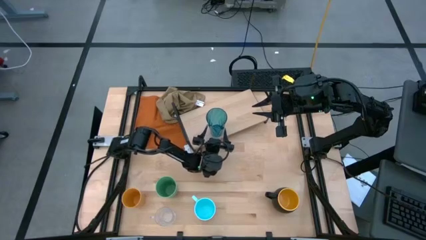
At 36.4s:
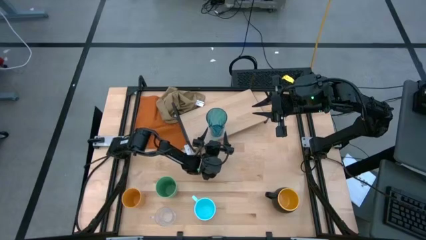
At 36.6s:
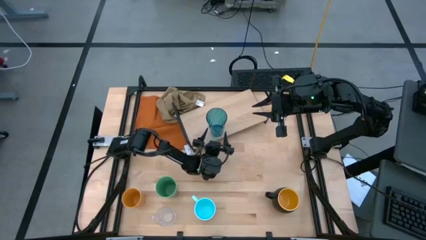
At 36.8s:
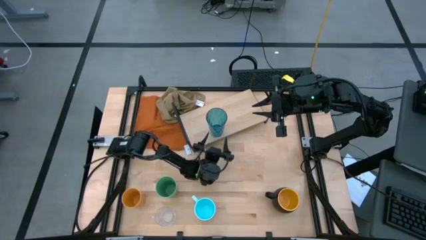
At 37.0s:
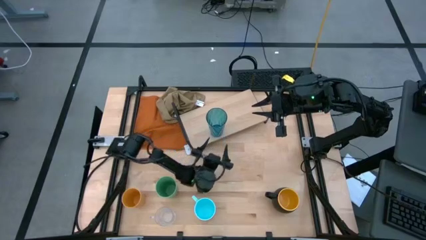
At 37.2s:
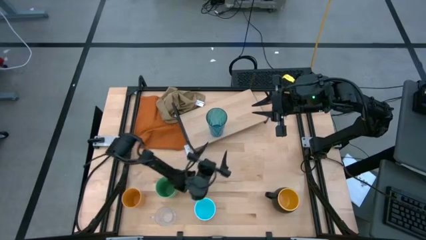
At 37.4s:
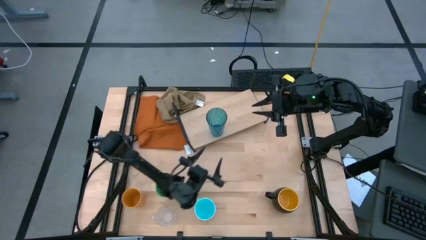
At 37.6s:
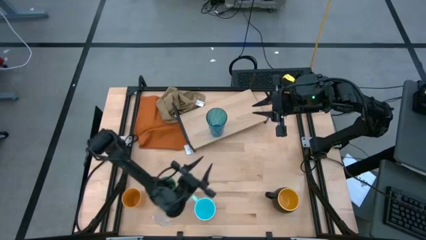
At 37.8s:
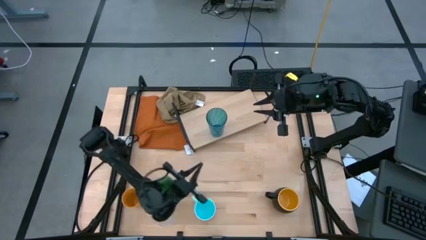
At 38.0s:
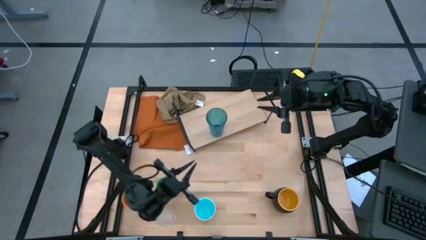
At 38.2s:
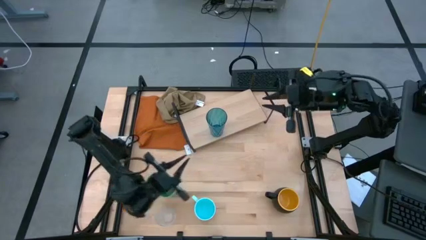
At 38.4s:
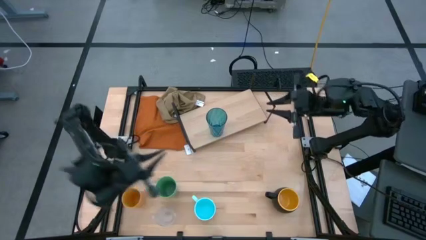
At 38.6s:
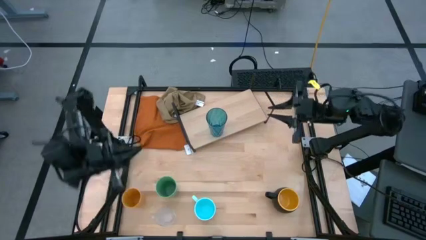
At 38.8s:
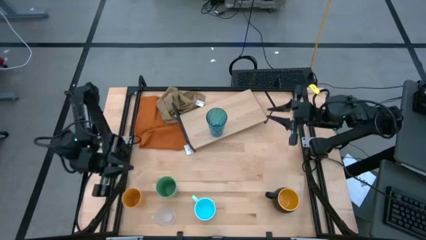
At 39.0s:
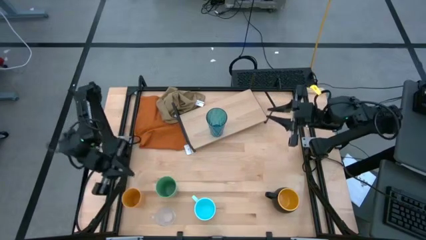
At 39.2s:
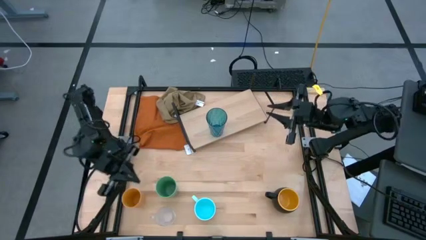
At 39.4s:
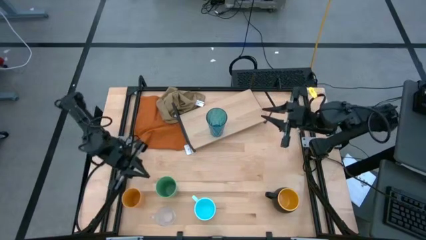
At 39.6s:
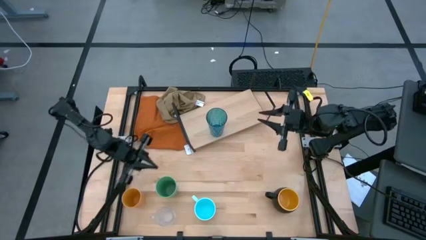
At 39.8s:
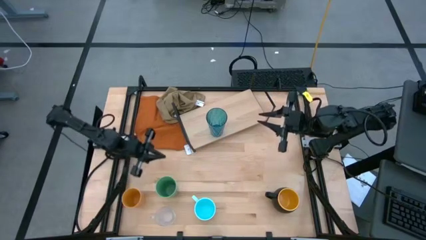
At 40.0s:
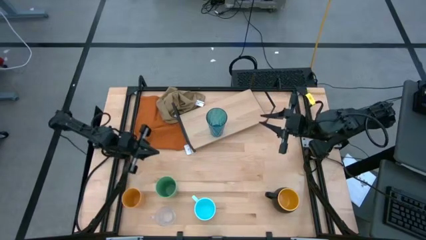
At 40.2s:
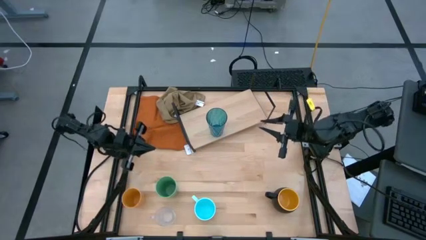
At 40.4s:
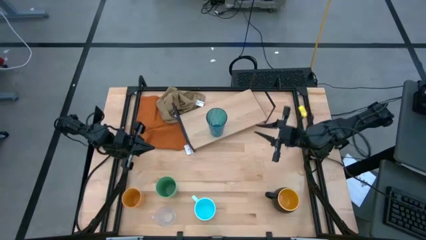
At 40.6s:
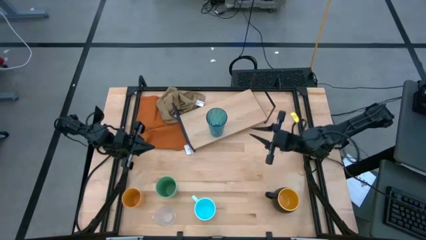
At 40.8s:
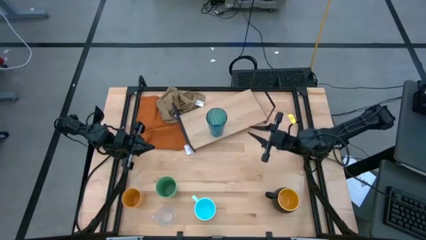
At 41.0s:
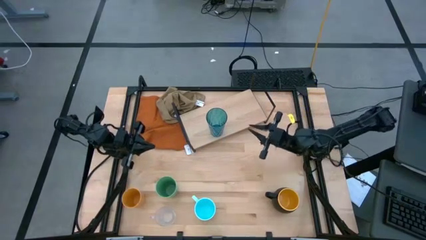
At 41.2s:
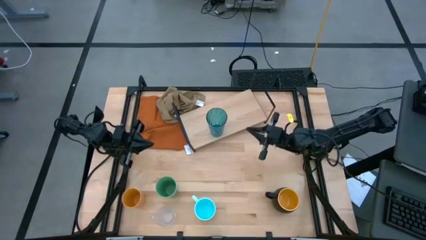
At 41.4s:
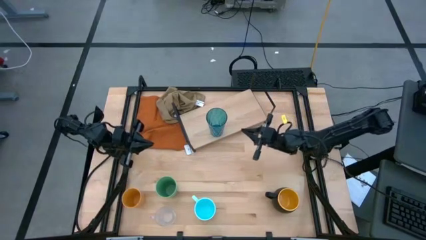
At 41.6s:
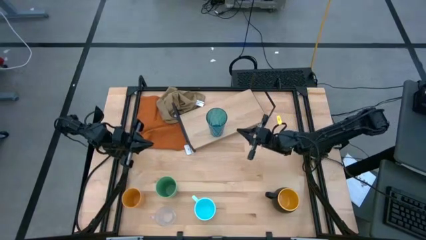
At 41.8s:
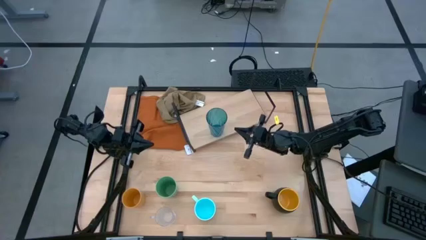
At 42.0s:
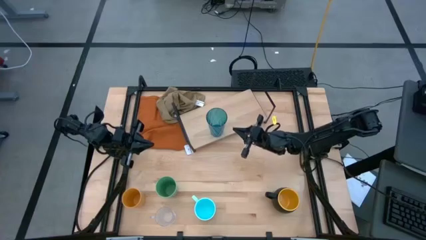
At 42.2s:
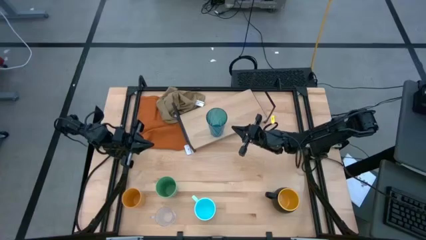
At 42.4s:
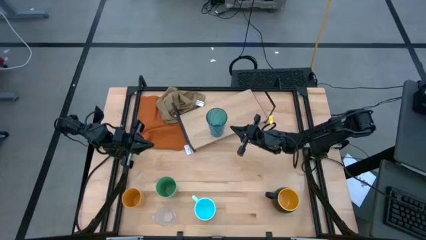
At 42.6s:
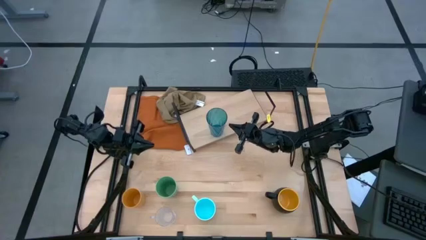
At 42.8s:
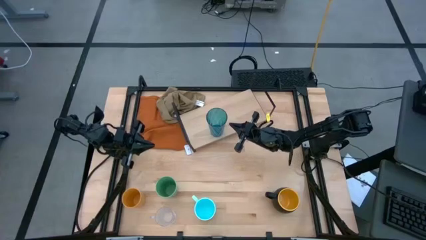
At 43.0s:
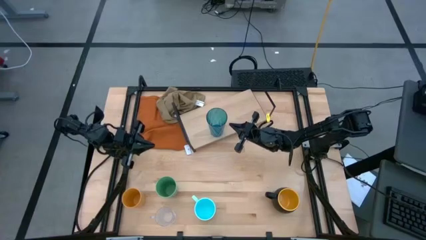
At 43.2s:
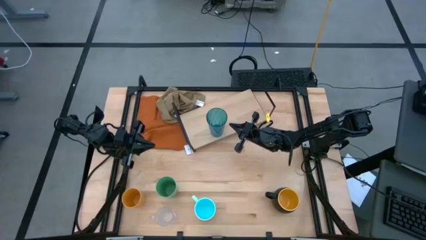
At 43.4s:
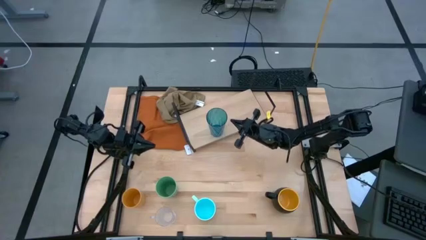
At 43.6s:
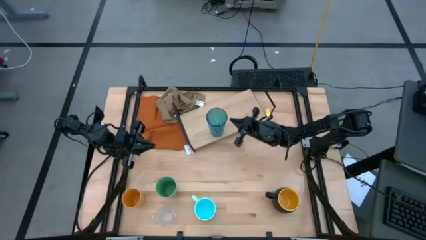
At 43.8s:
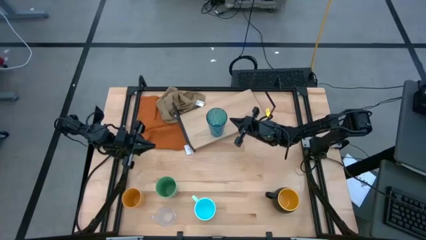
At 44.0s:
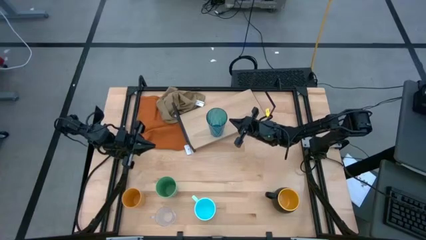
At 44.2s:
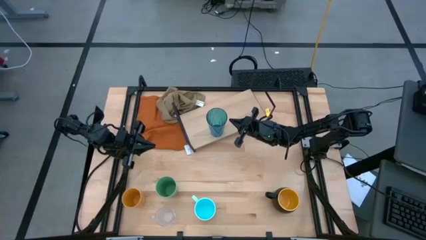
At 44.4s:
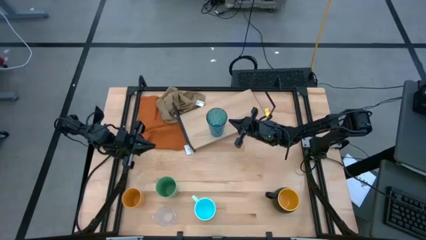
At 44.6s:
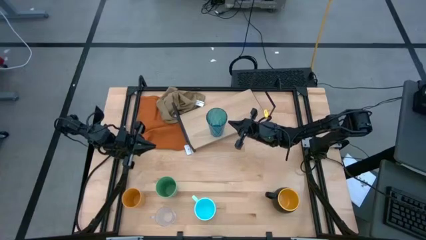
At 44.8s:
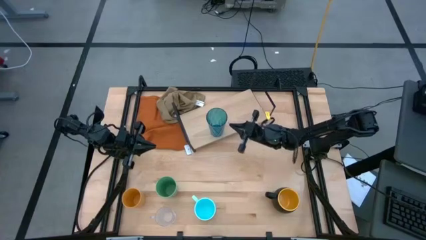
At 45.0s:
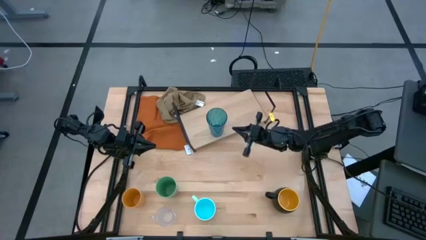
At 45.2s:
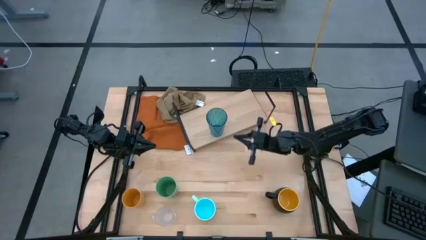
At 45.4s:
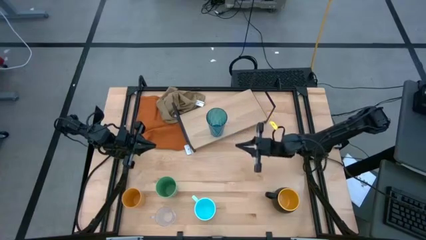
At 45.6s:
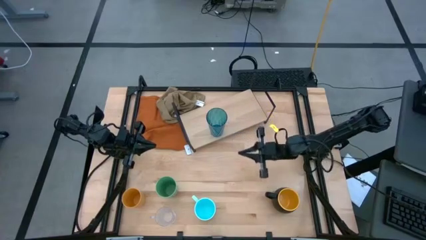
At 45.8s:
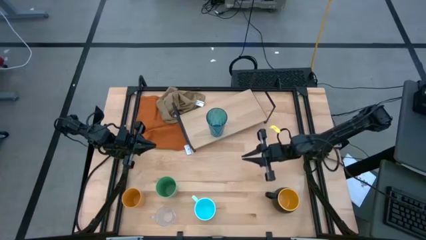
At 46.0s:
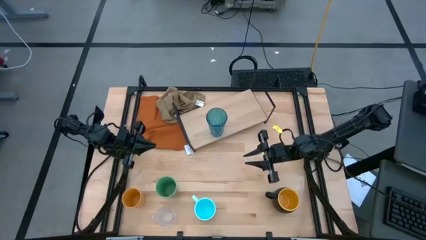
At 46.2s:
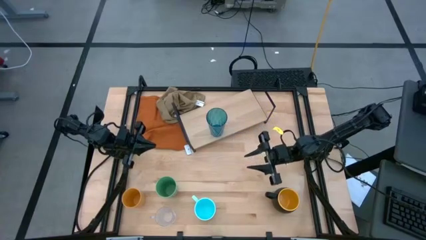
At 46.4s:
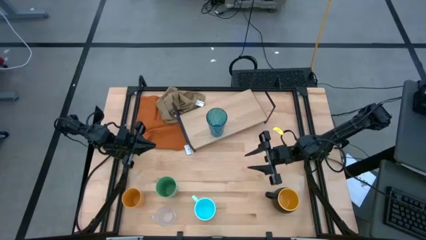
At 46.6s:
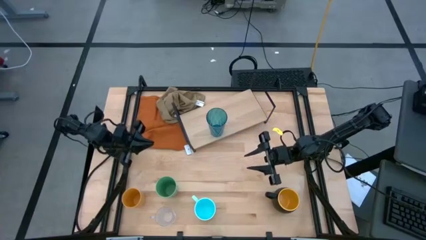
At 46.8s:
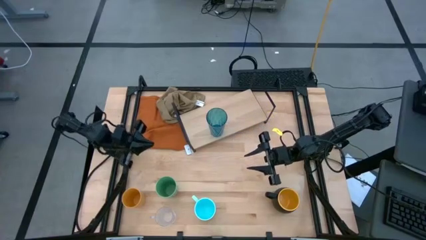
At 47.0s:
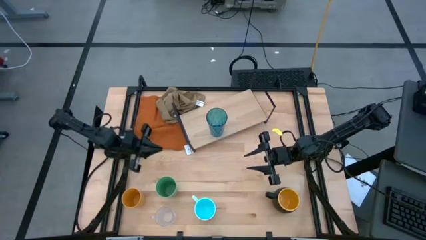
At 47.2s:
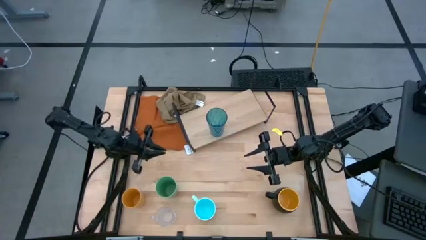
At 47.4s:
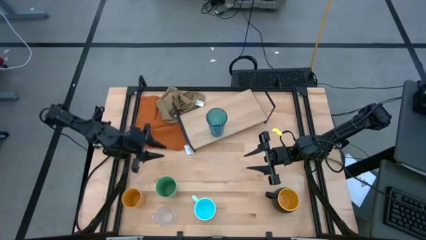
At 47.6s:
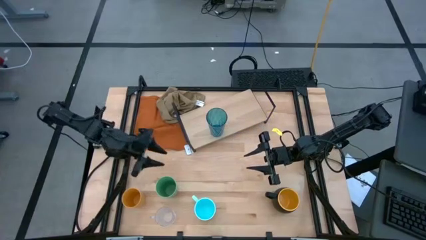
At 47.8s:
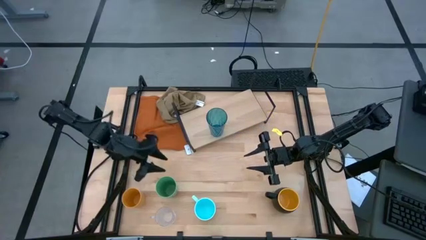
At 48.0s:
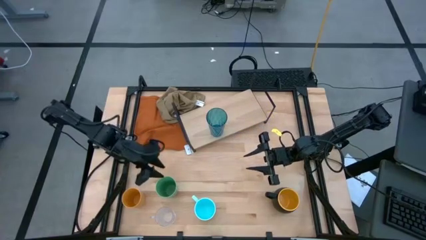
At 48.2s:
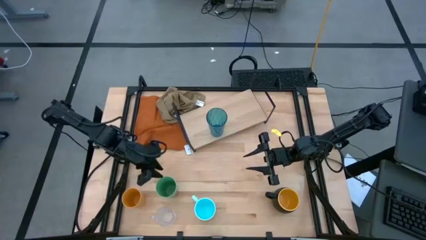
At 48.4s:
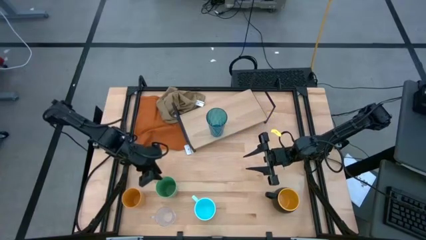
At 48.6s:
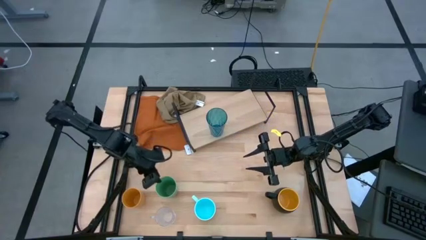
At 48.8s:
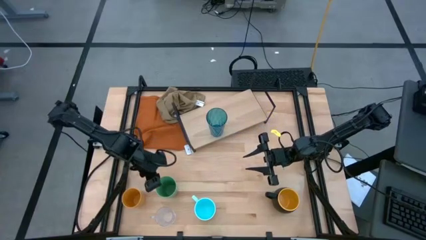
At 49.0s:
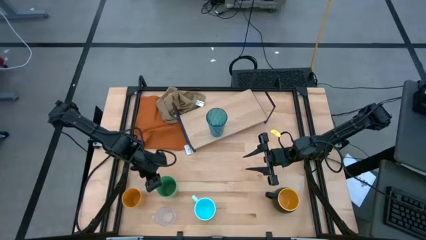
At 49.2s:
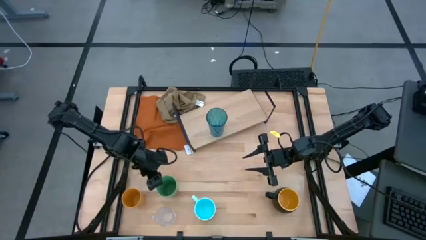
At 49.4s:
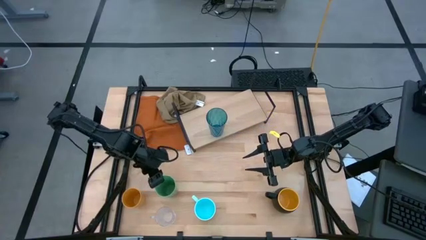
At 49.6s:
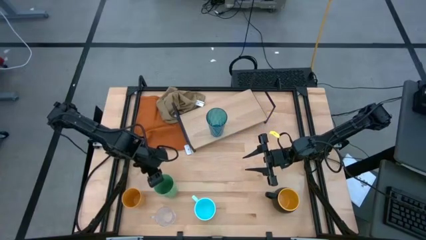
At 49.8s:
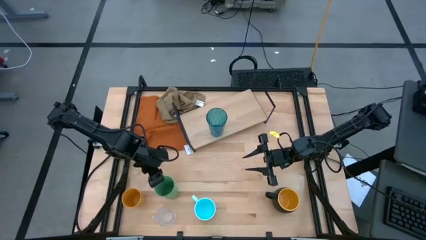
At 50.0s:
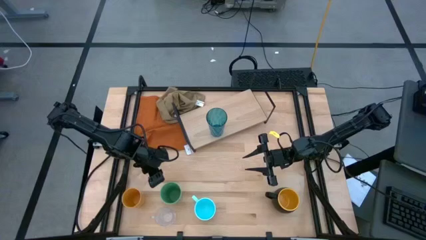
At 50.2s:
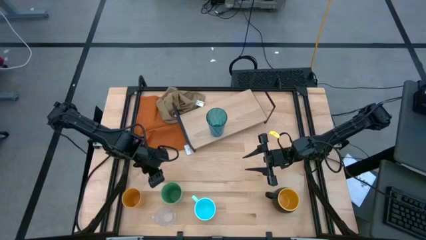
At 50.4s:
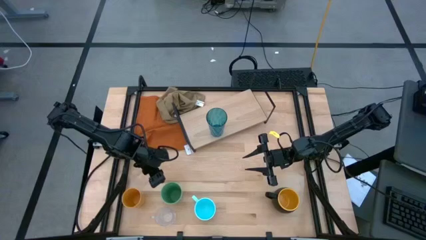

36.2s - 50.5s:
Task: Stack small to large cups/mugs on shelf
Put the green cup on the shelf
